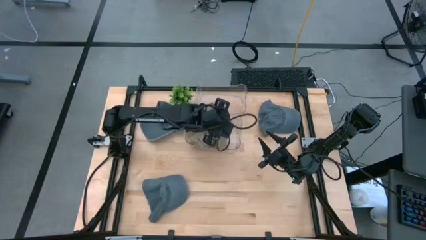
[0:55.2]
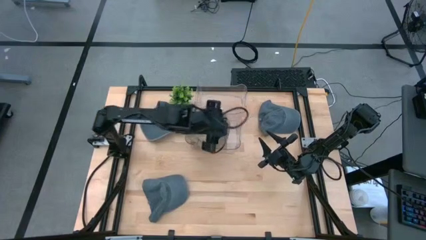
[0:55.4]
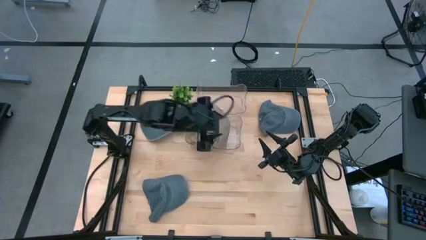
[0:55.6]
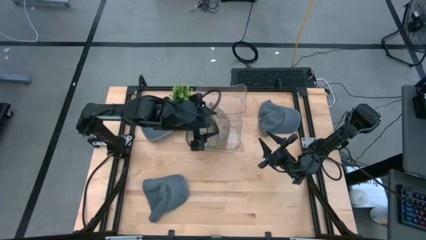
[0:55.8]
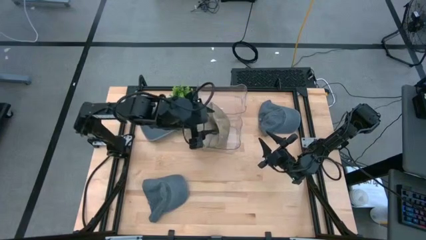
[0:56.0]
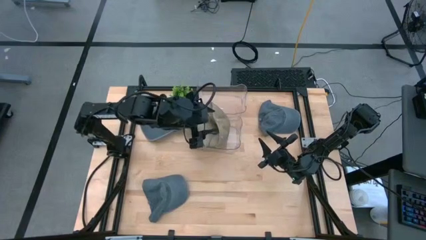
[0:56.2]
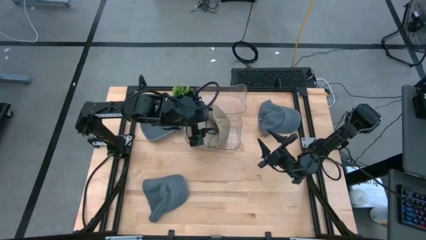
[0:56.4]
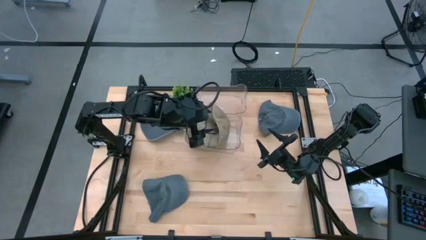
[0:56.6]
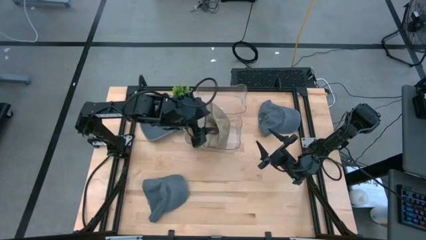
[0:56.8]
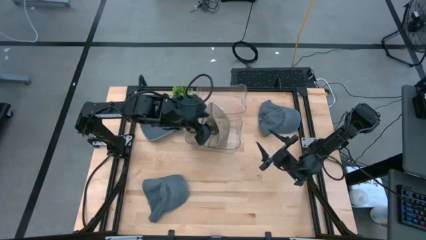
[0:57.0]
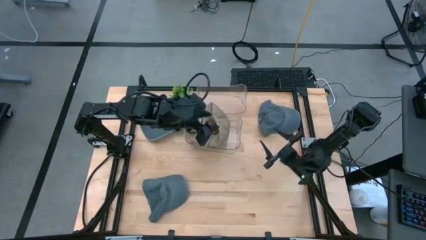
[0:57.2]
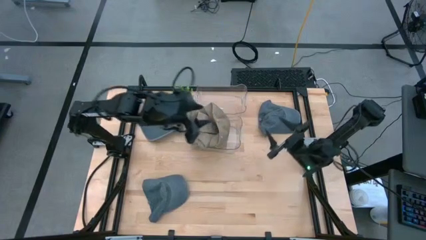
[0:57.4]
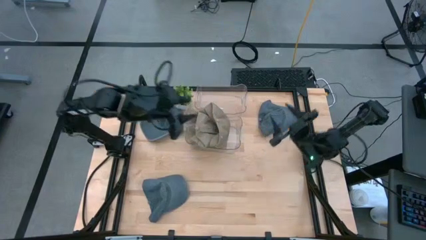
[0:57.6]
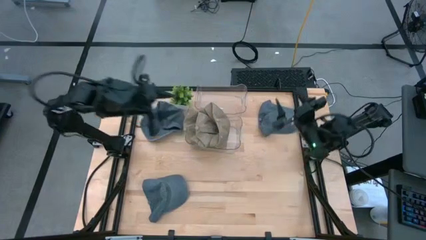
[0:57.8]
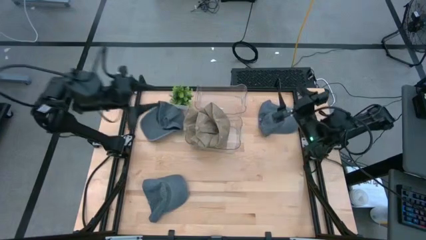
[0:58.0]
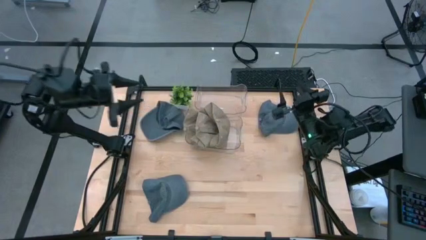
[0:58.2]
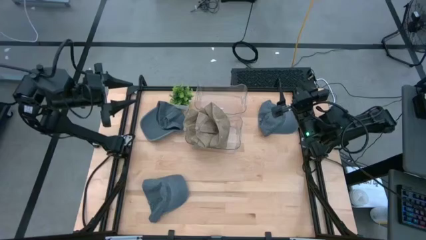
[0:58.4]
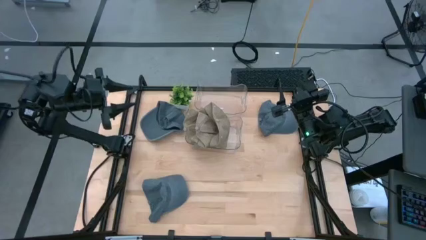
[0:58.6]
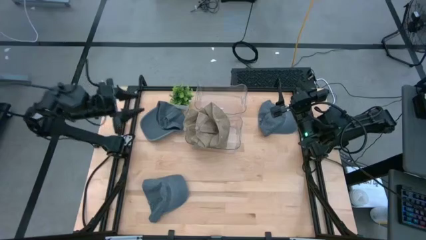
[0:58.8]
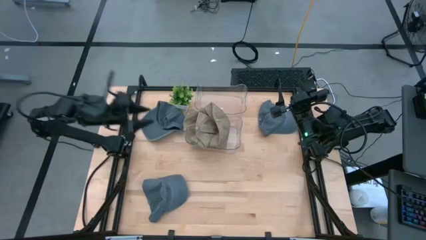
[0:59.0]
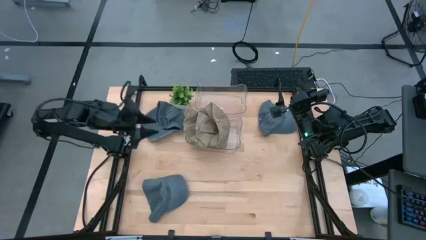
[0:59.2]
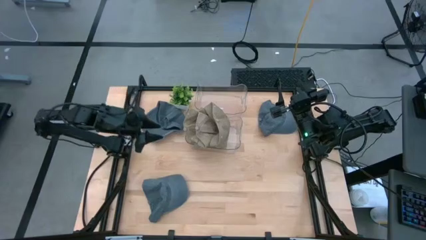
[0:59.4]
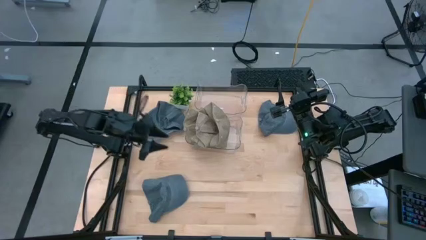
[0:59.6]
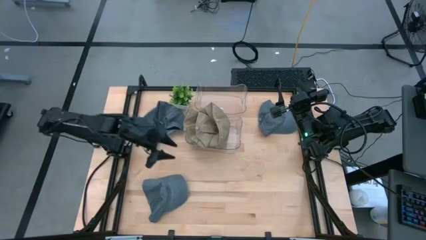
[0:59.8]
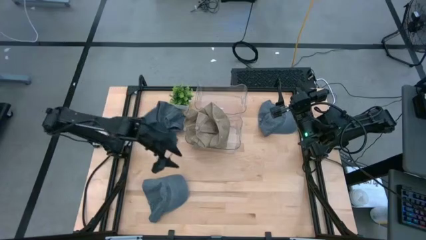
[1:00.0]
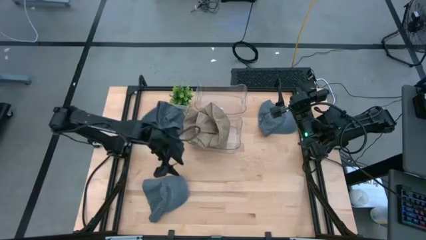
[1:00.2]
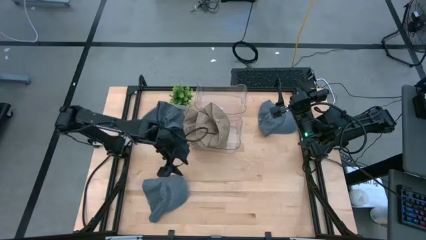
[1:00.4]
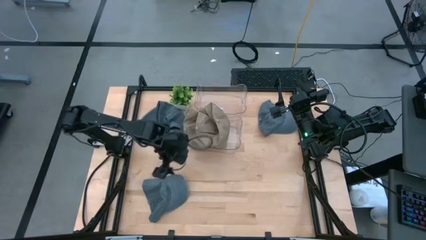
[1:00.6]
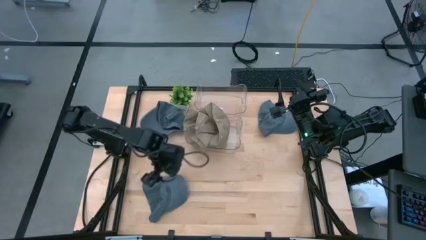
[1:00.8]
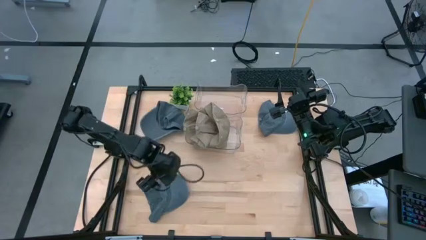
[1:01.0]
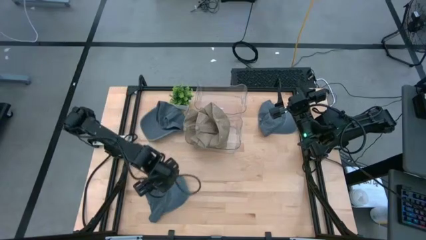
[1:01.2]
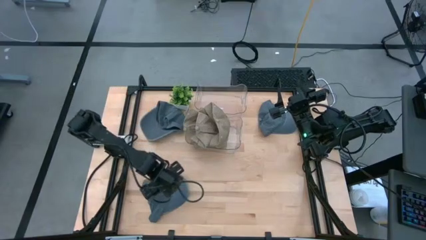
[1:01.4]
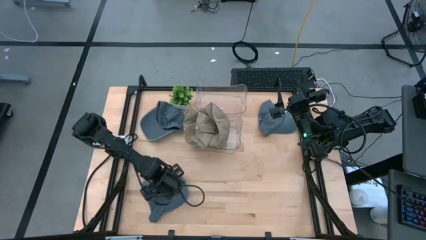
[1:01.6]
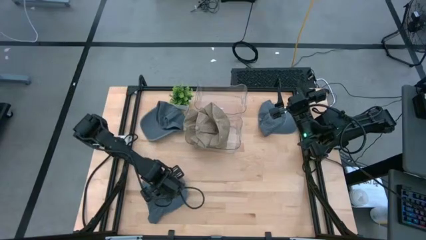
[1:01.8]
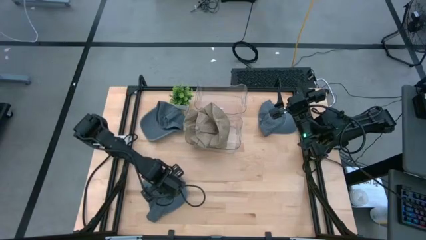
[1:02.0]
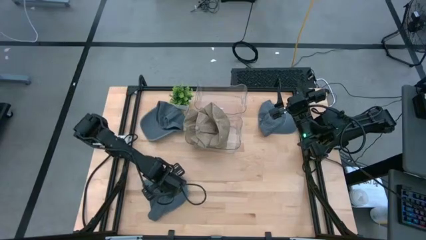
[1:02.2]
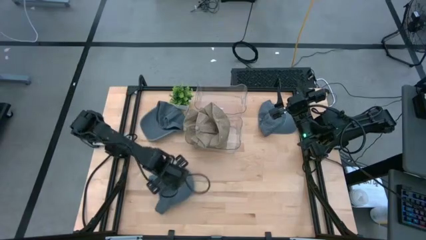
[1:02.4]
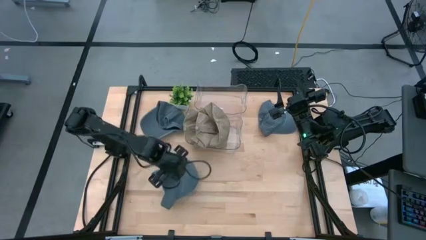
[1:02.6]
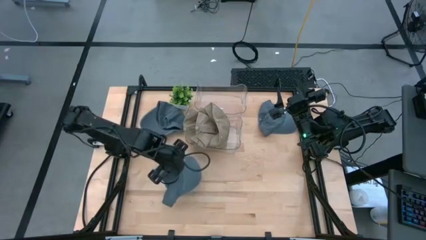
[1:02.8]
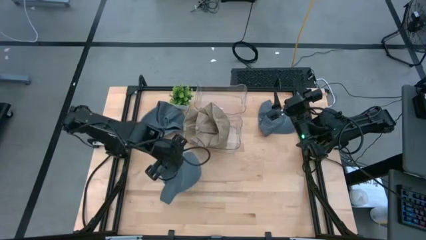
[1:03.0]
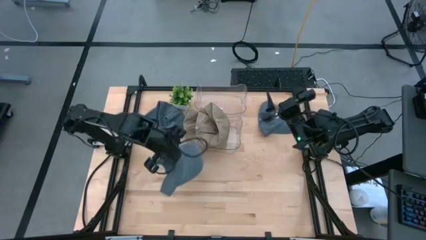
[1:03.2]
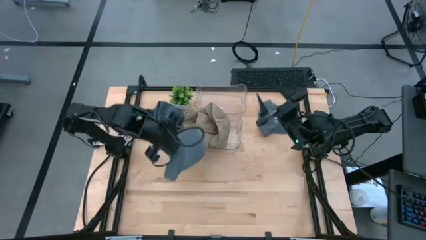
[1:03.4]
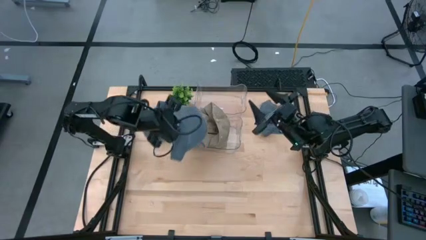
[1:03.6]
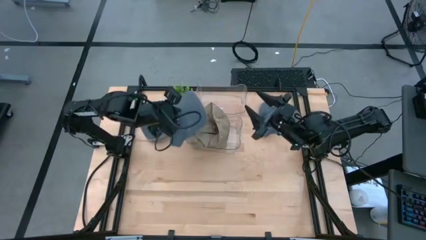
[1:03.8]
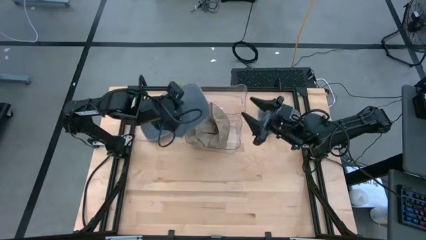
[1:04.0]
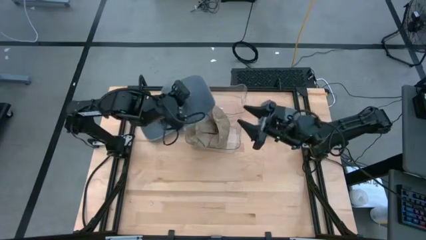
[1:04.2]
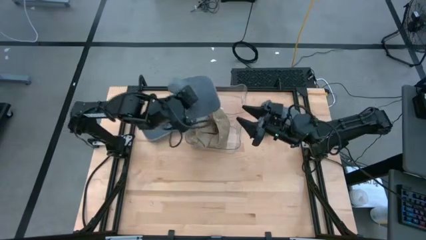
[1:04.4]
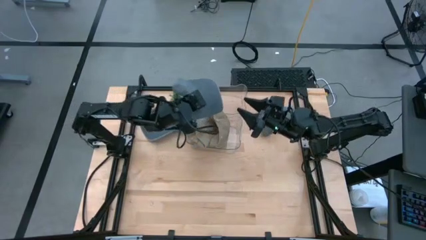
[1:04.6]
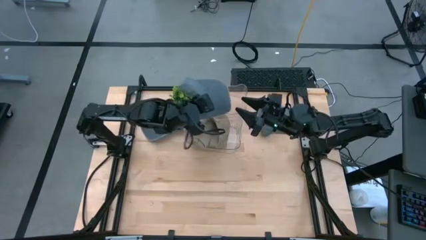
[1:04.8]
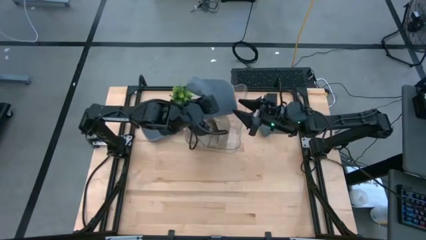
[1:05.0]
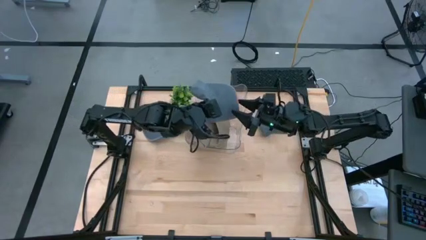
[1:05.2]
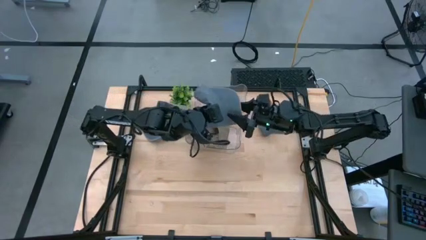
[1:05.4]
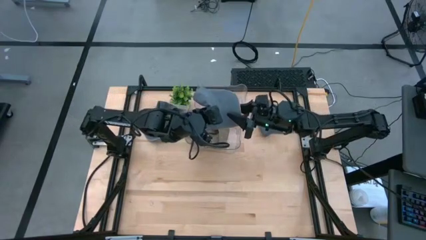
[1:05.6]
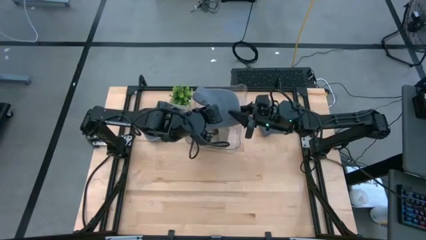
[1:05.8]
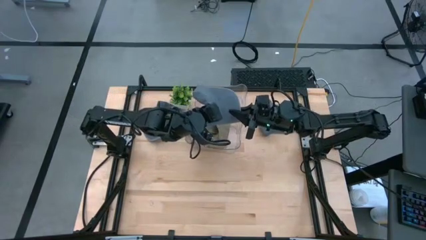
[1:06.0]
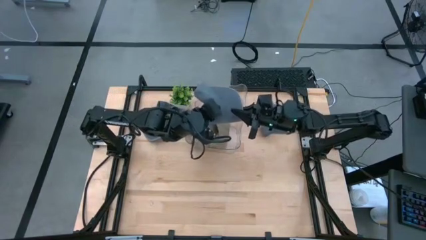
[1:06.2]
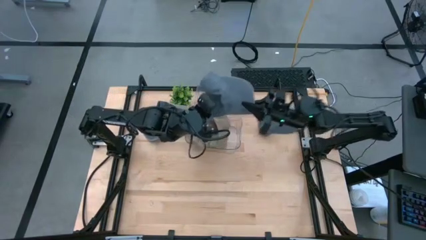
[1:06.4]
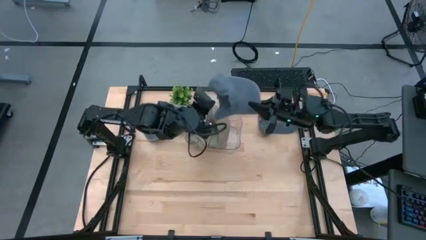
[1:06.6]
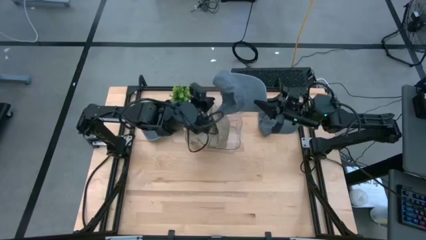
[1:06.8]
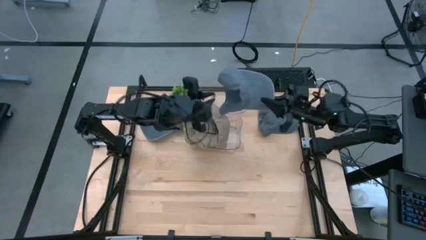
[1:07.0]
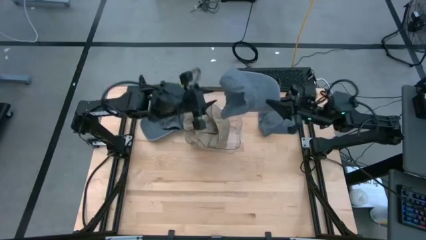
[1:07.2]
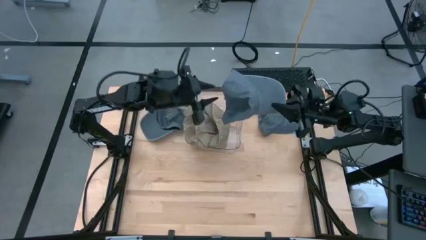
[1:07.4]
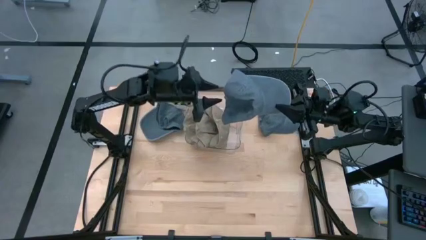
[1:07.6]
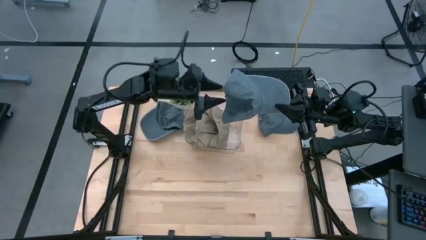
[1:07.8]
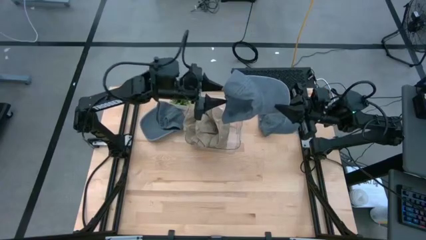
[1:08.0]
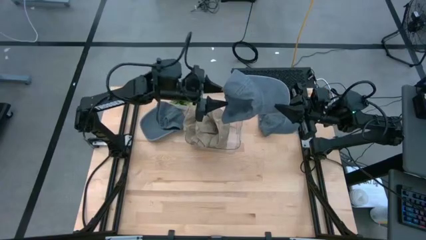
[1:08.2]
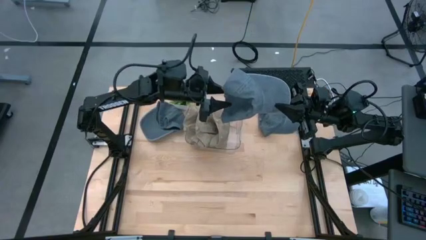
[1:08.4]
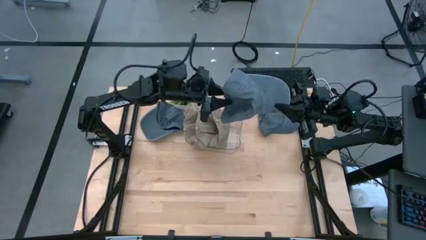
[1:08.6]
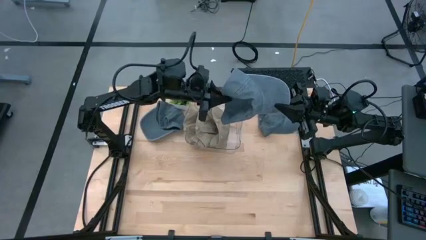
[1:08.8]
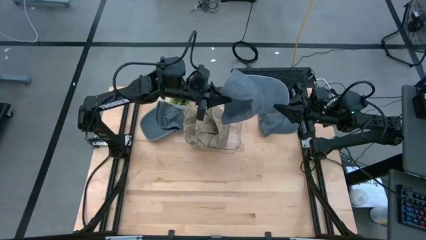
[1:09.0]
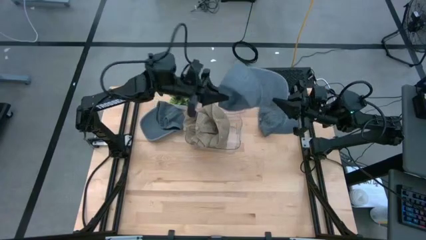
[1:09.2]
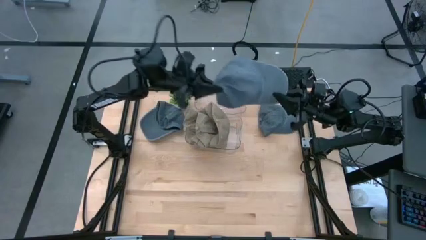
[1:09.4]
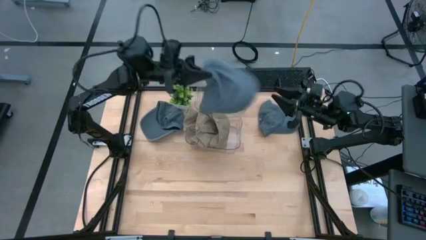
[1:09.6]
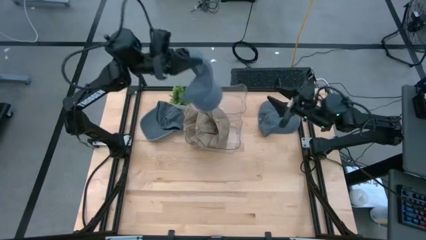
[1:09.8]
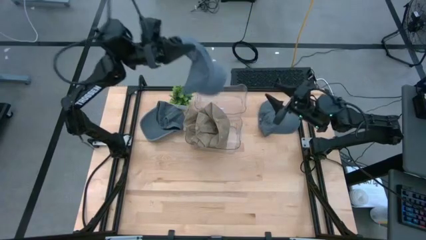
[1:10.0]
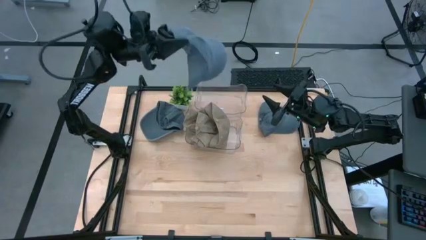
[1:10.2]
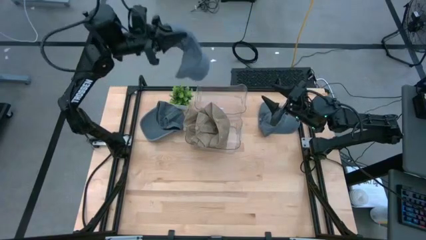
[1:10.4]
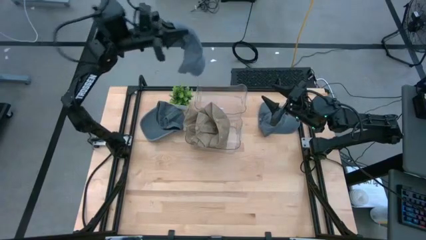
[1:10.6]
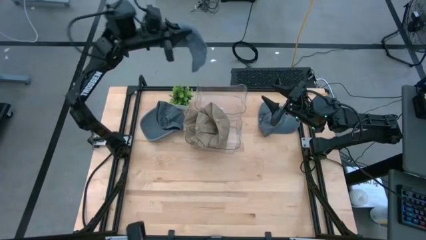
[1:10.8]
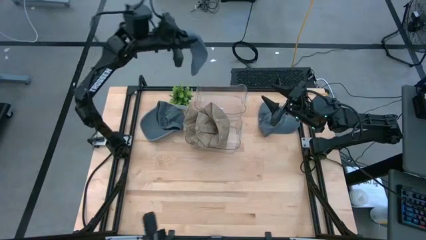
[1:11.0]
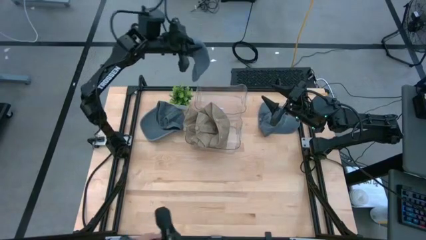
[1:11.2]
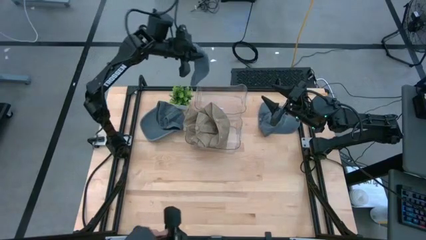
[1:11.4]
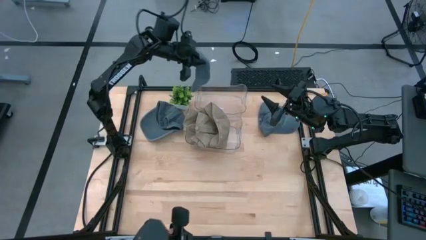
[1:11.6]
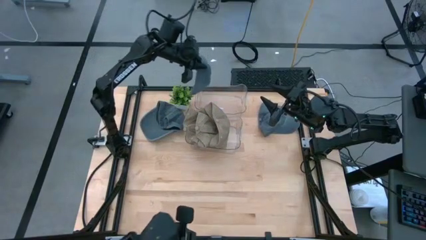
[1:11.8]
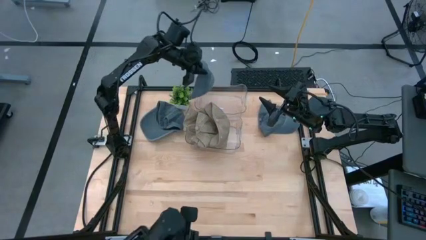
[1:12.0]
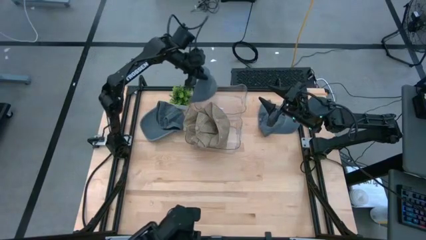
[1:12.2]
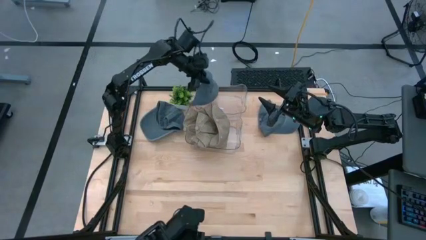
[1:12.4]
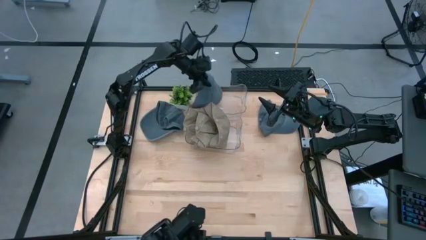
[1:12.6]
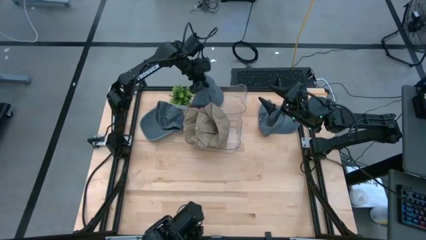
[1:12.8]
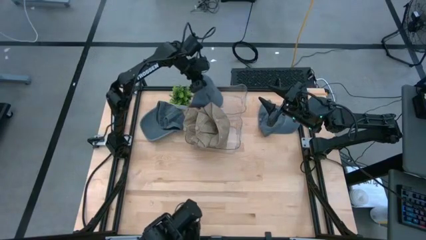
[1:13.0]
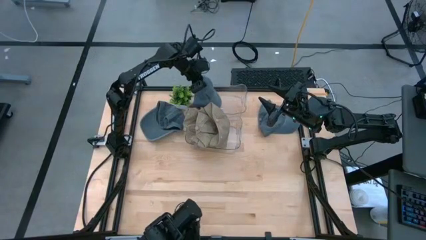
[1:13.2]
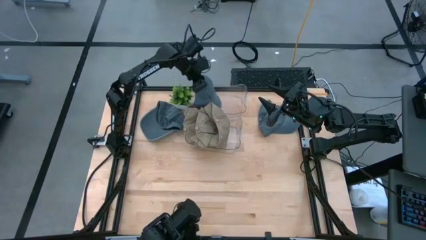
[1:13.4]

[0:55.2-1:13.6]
Task: Pick & Place hat
Put the bottom gray cap into the top transparent bin
